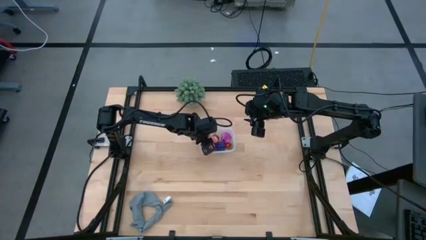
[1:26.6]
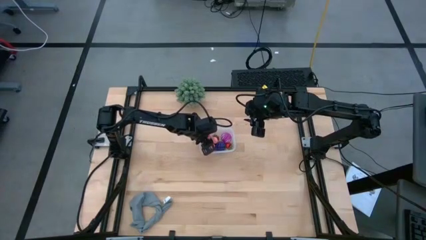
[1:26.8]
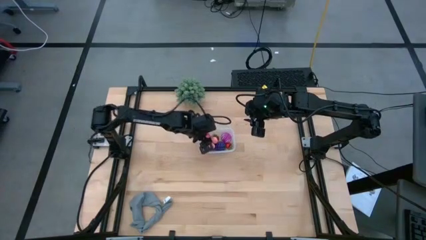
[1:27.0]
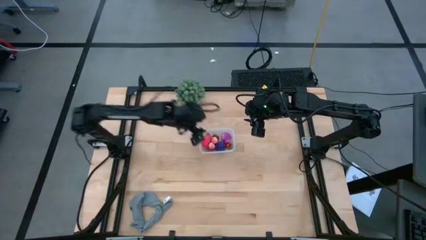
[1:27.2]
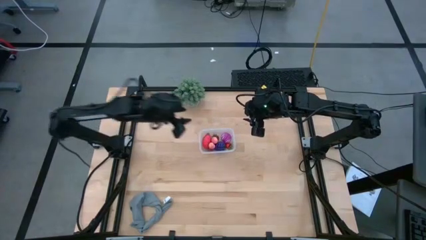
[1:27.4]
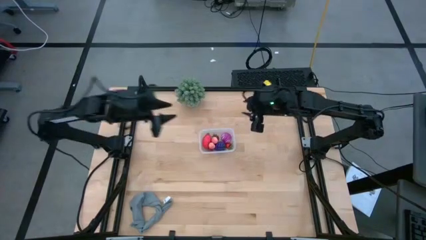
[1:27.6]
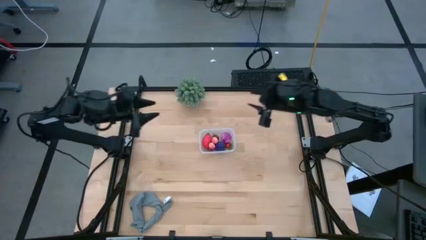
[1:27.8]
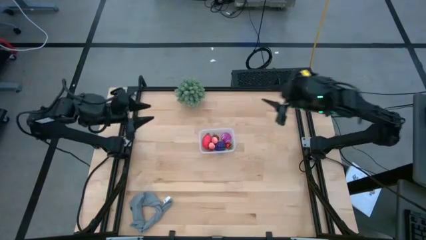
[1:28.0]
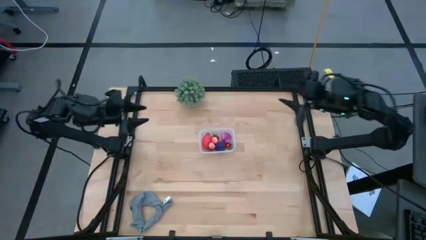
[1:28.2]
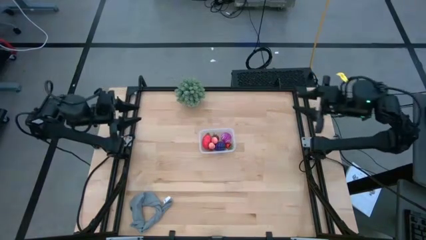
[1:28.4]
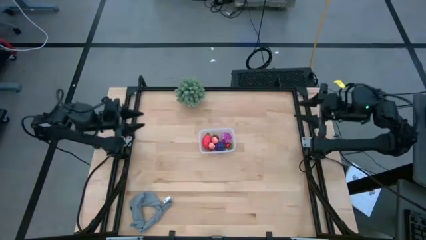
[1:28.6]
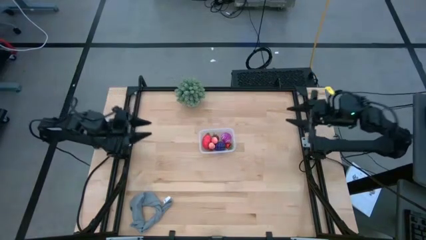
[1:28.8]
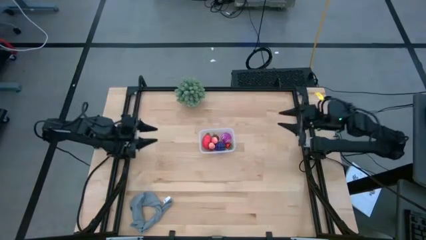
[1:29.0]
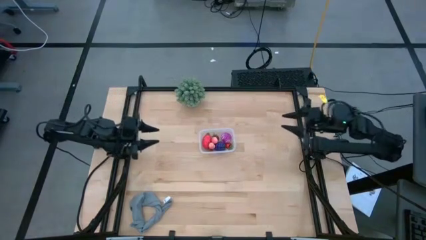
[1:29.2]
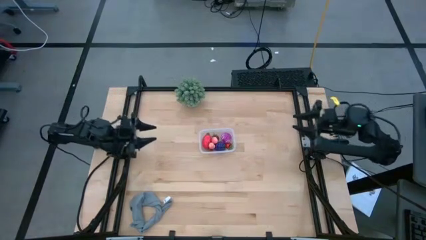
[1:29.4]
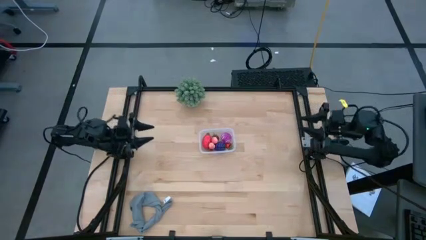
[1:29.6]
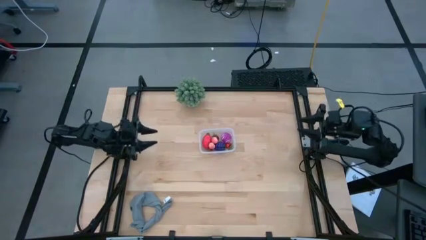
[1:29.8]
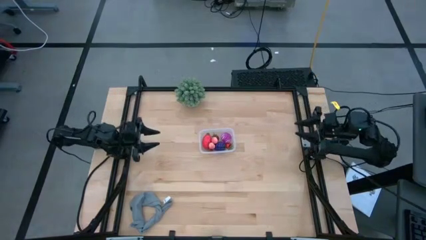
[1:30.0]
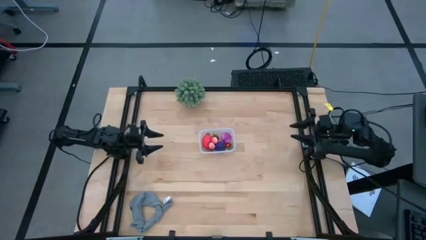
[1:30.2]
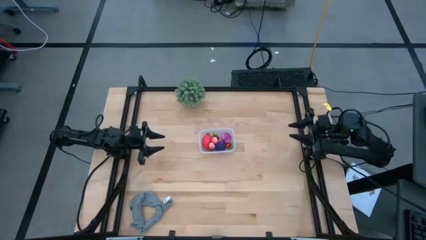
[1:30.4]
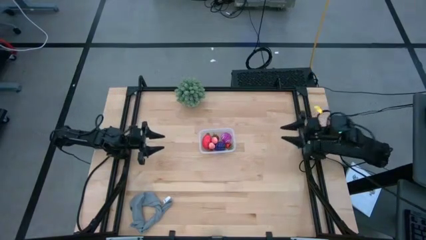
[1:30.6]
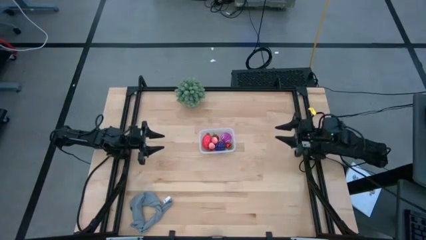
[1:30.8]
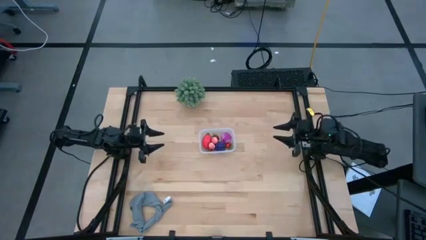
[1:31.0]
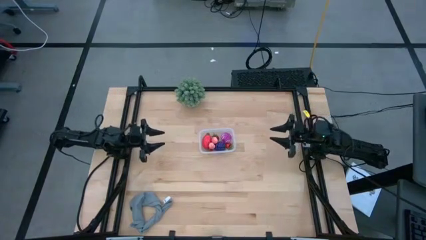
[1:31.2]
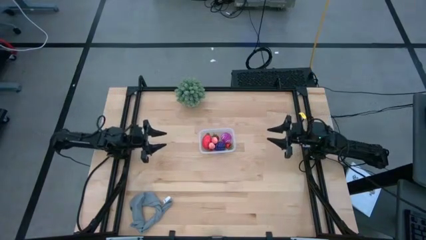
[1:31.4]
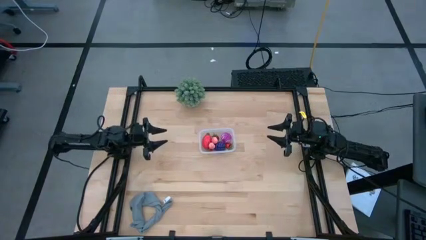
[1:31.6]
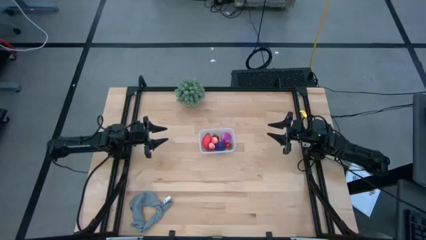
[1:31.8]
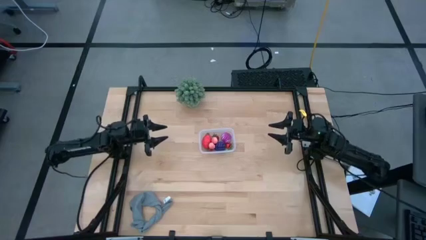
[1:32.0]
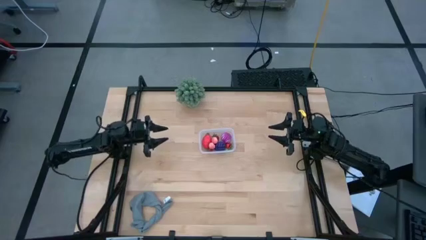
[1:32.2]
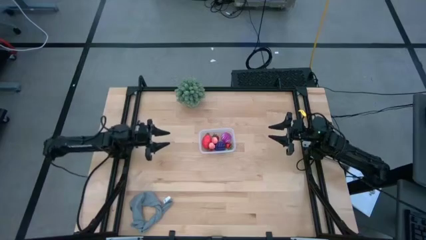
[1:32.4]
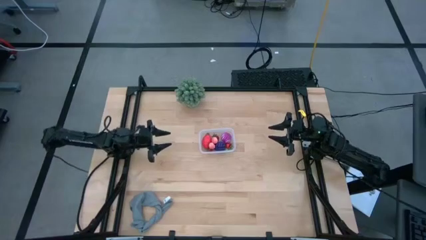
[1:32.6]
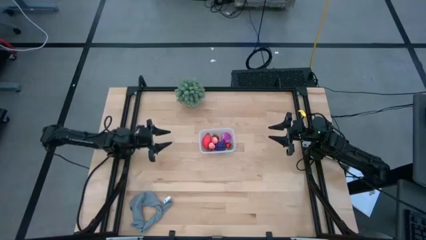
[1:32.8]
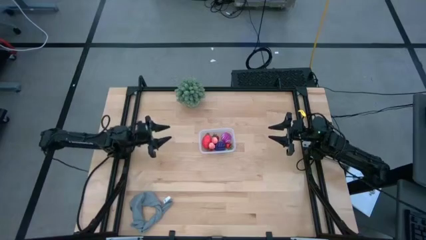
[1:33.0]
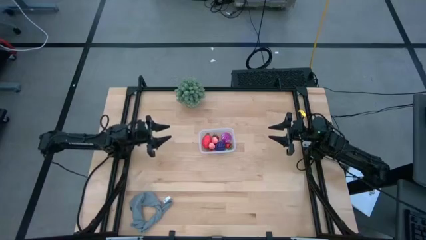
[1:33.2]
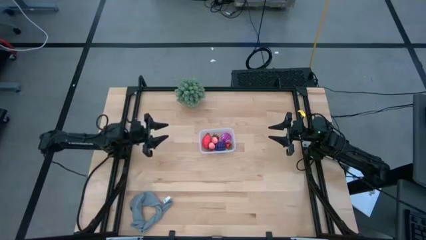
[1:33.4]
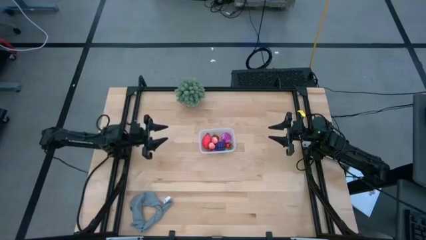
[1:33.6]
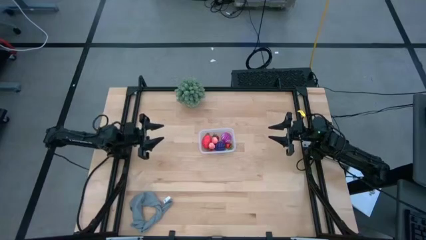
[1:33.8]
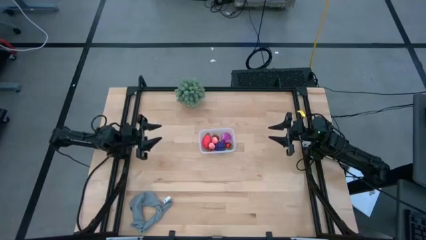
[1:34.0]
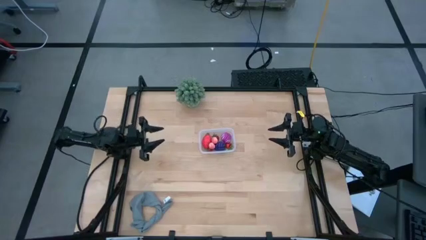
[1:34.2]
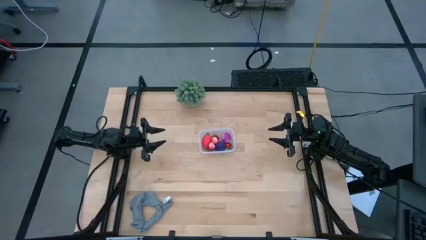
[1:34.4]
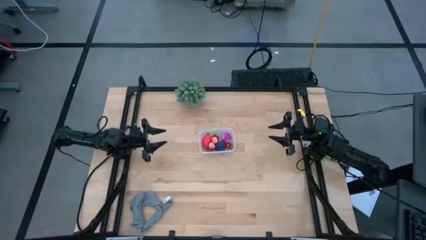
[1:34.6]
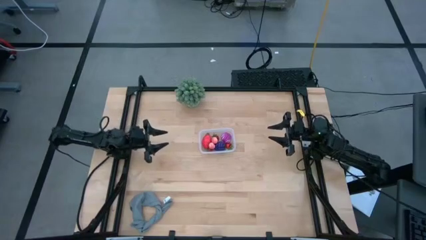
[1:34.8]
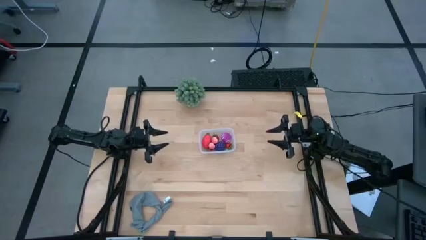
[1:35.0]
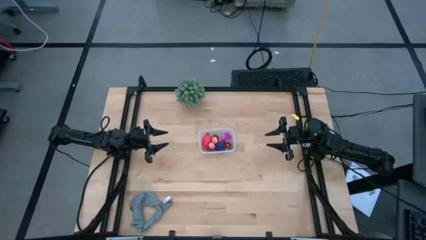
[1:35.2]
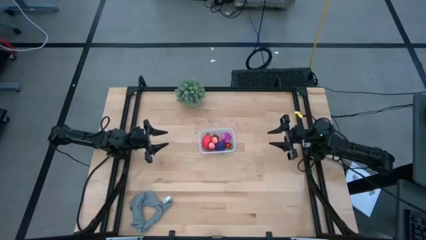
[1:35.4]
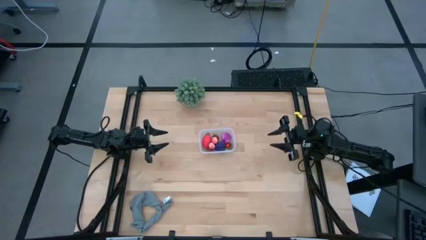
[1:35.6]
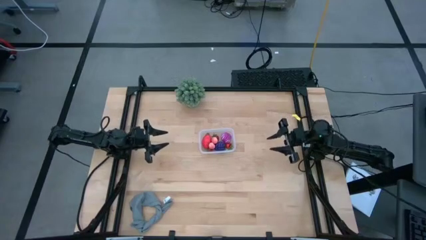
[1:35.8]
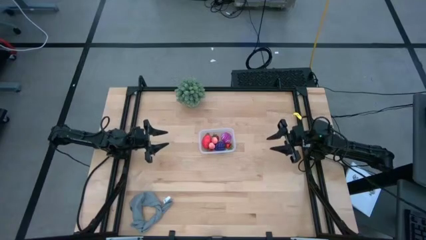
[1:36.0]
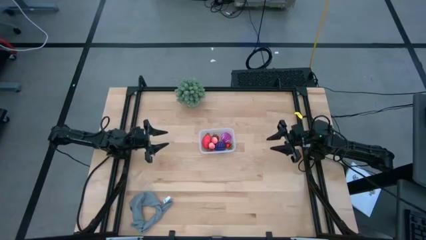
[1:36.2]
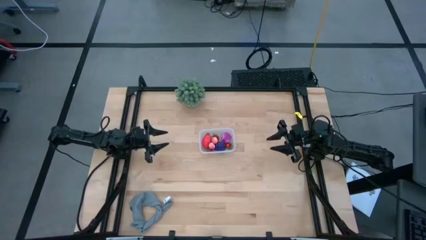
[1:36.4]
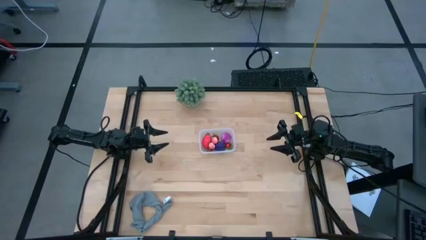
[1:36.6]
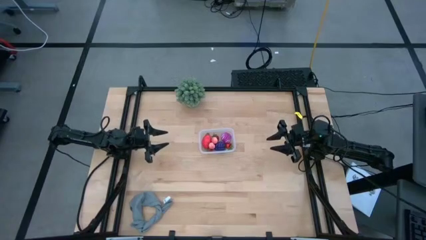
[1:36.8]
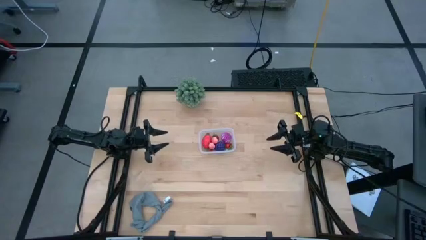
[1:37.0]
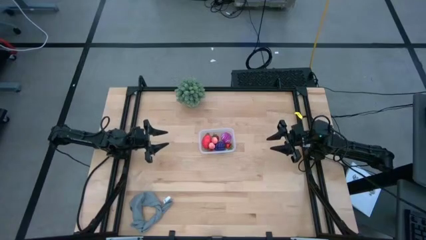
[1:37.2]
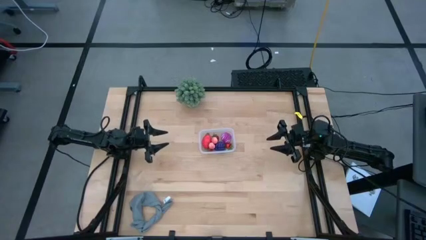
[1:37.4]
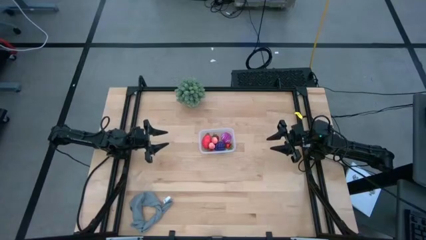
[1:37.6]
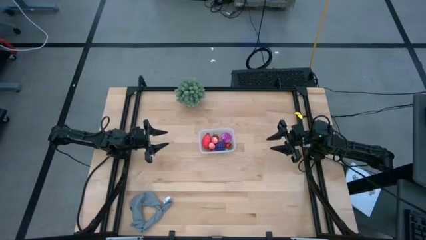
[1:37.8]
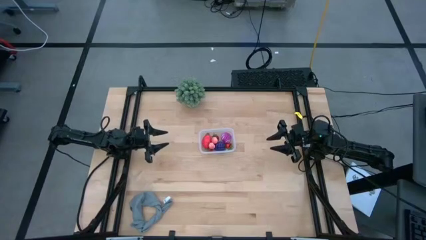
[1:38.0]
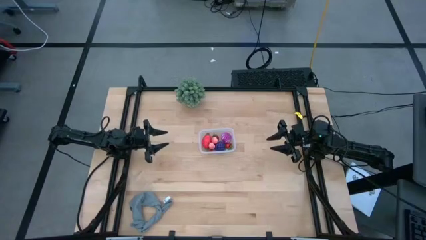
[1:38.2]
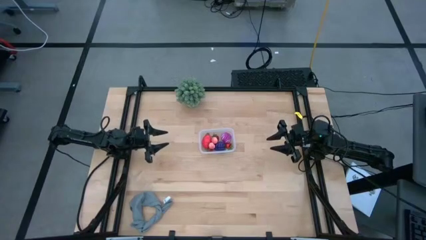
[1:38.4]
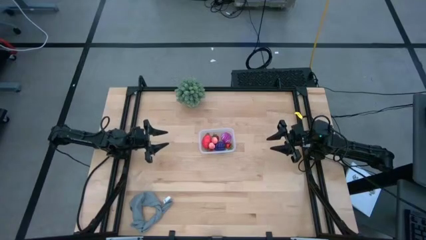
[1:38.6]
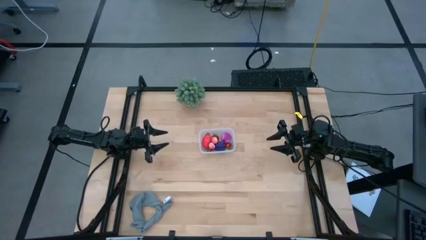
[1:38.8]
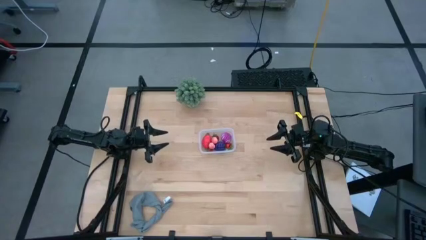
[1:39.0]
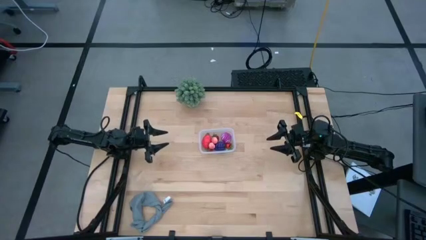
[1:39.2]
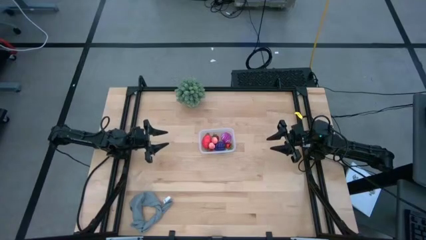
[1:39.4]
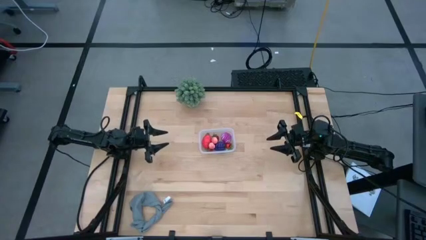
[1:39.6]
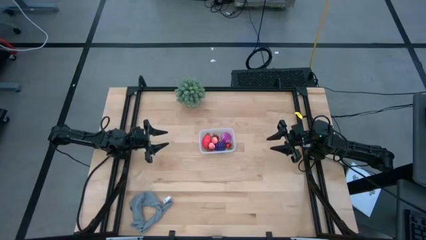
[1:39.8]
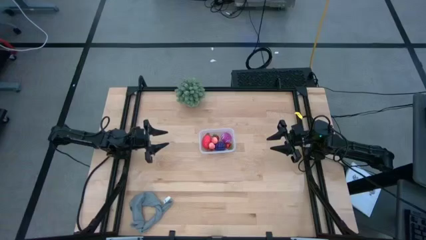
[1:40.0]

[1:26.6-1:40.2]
Task: Pick and placing Produce into tupperware
Return to Home Position
